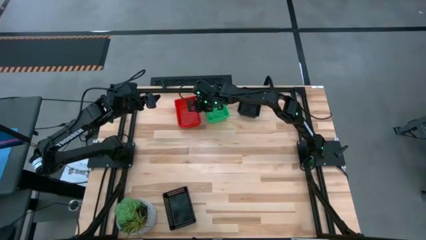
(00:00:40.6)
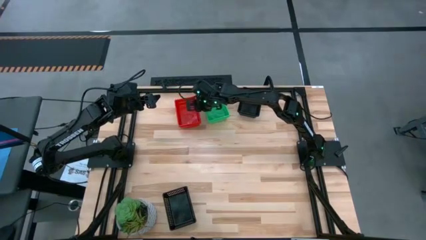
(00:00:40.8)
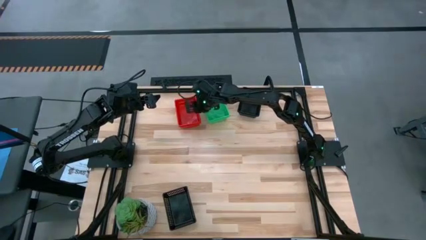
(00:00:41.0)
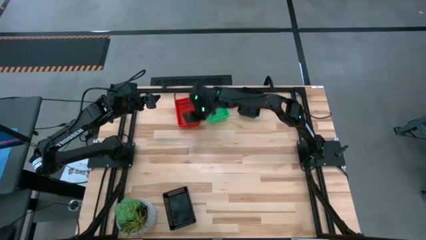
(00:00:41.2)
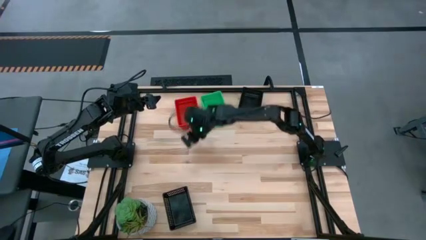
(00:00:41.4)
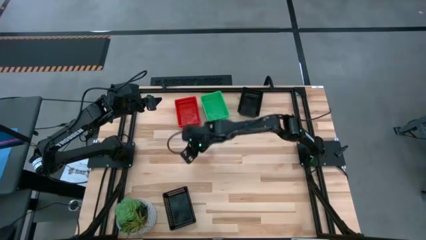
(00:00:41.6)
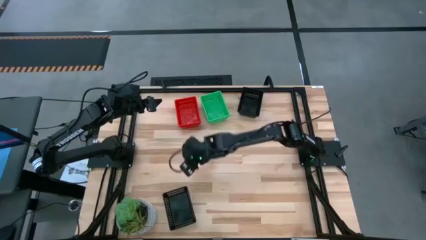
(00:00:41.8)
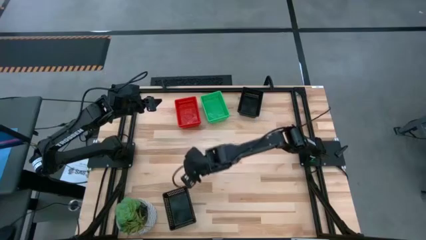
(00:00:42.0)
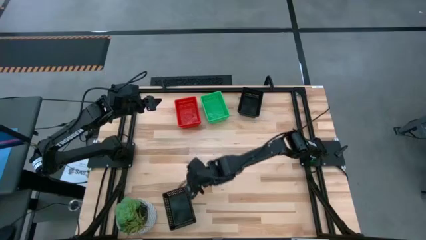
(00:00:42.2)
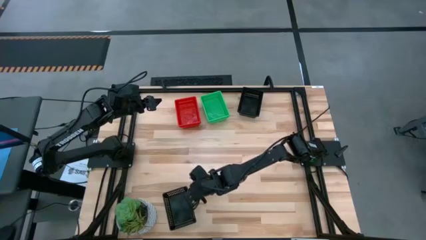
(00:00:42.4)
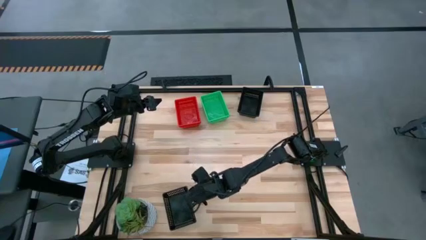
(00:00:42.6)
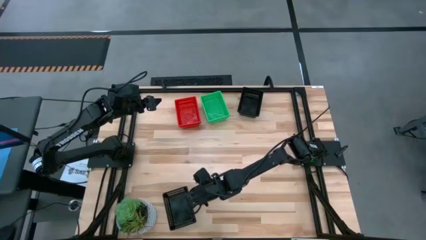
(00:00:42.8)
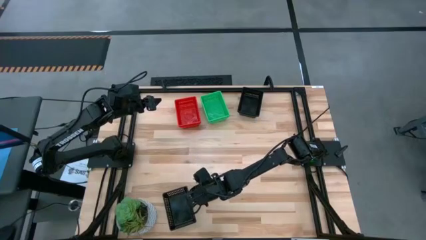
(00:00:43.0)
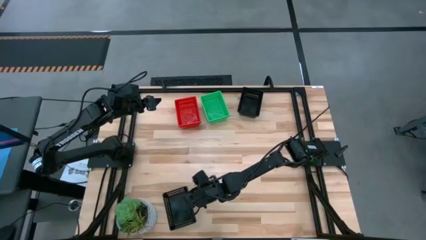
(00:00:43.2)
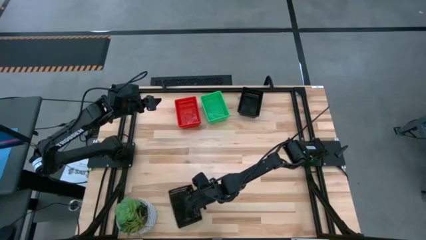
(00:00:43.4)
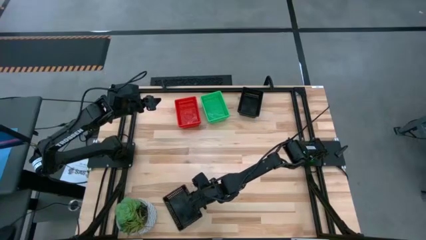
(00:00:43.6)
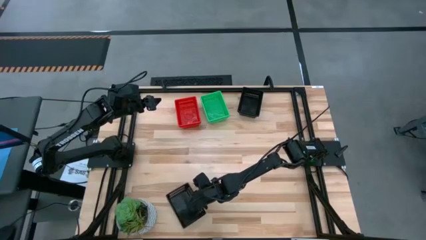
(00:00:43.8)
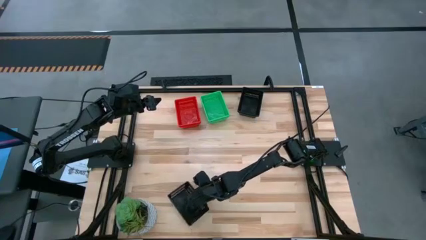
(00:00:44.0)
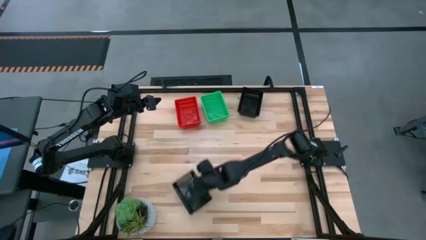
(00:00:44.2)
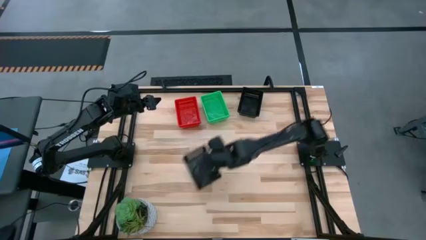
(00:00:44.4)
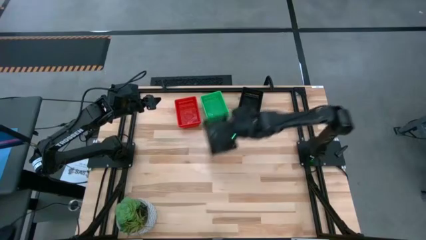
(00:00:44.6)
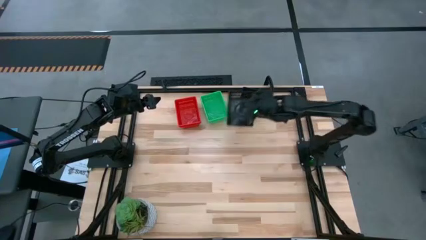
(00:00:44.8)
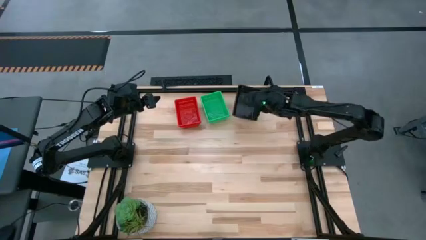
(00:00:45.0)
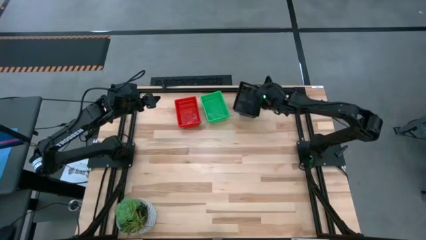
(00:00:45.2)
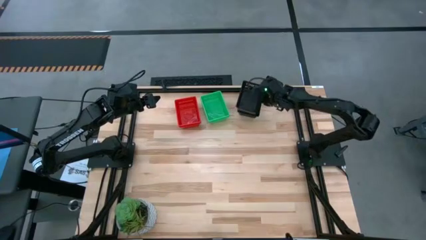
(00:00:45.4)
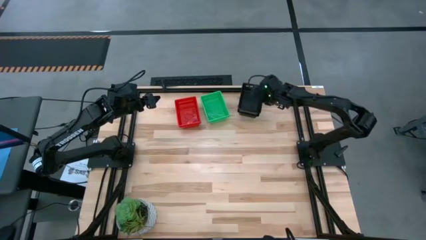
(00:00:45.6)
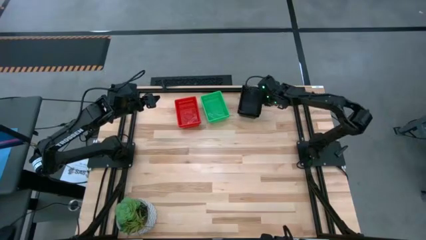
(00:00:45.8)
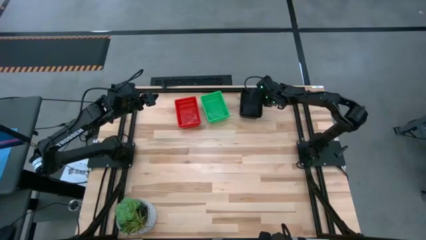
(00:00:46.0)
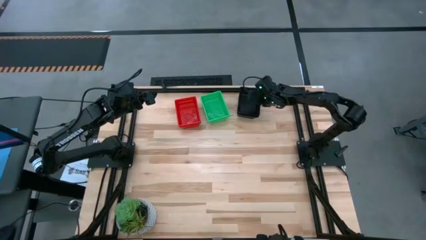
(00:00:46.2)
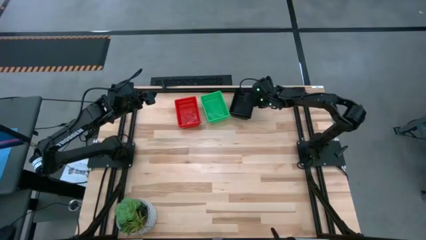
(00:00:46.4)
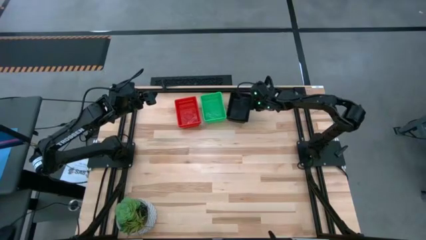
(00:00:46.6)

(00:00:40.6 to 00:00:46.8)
Stack the bottom black bin on top of the top black bins

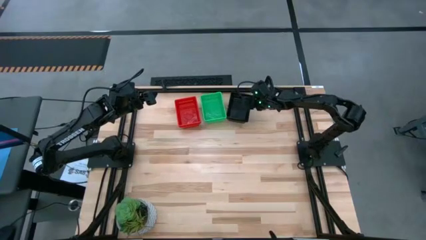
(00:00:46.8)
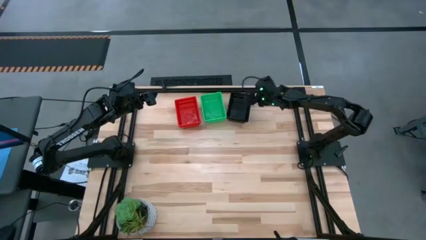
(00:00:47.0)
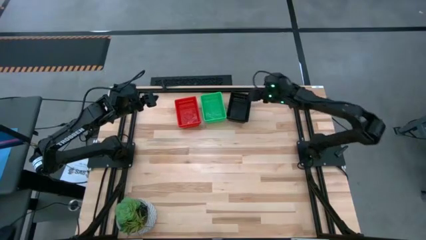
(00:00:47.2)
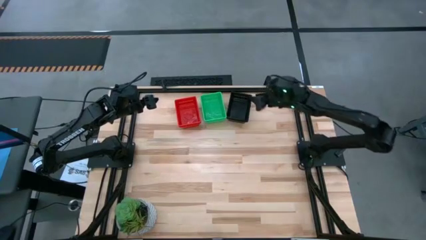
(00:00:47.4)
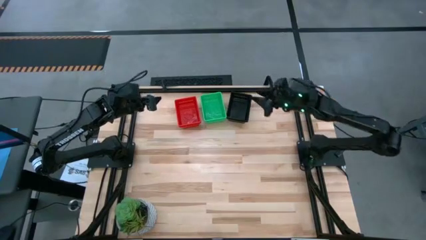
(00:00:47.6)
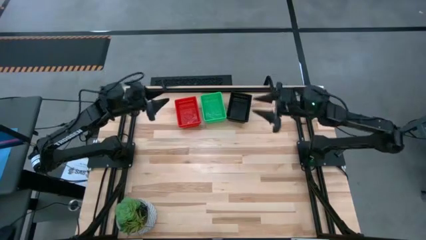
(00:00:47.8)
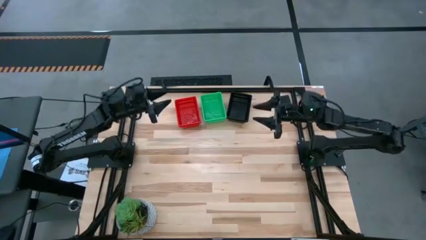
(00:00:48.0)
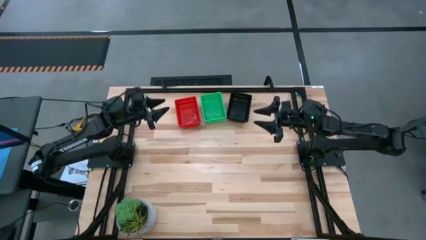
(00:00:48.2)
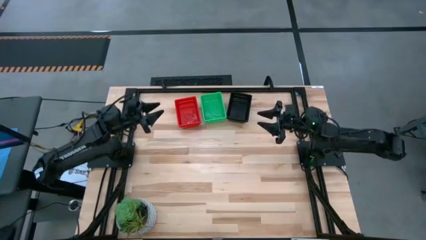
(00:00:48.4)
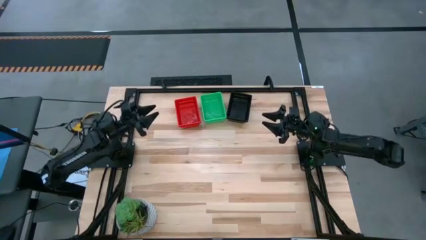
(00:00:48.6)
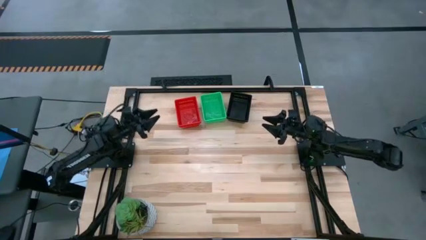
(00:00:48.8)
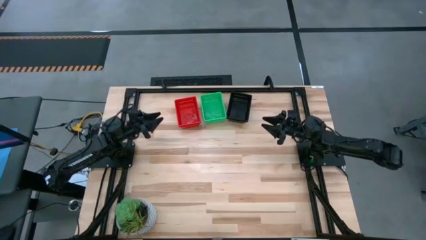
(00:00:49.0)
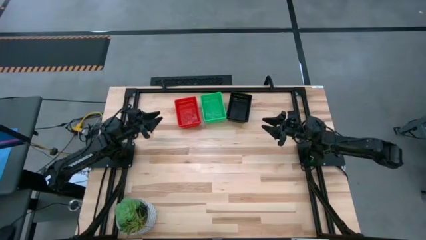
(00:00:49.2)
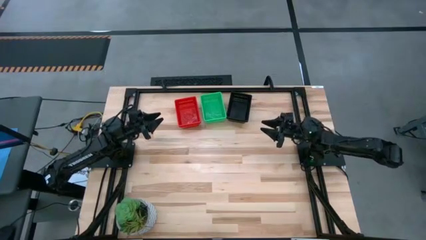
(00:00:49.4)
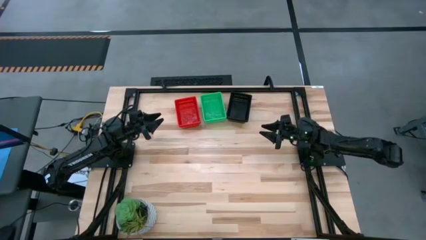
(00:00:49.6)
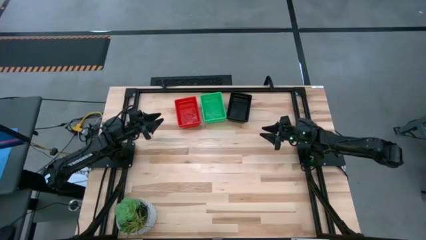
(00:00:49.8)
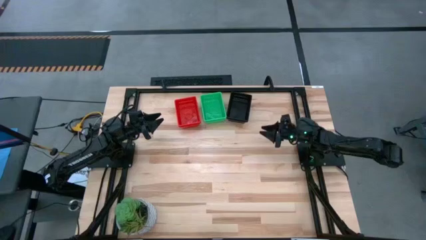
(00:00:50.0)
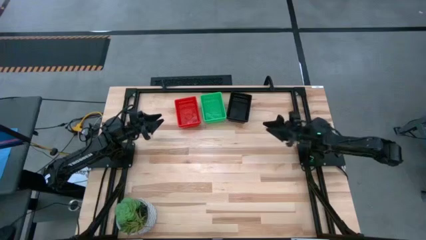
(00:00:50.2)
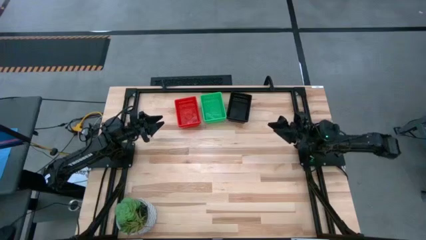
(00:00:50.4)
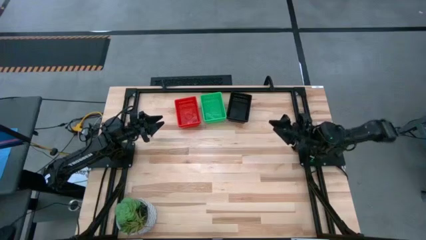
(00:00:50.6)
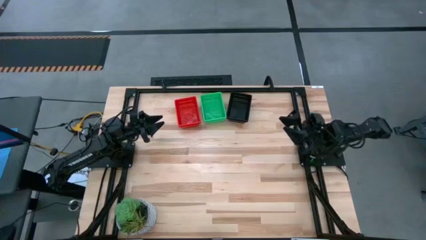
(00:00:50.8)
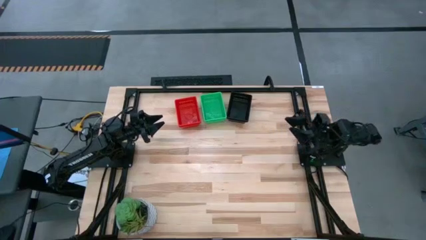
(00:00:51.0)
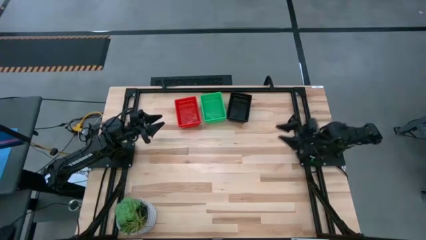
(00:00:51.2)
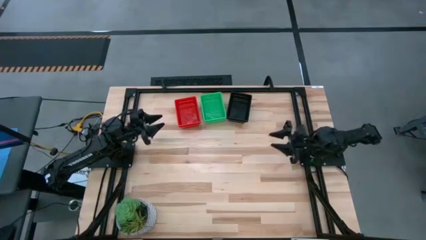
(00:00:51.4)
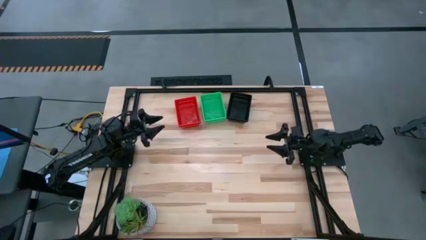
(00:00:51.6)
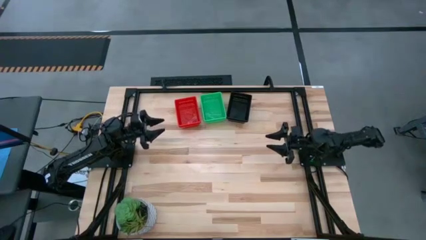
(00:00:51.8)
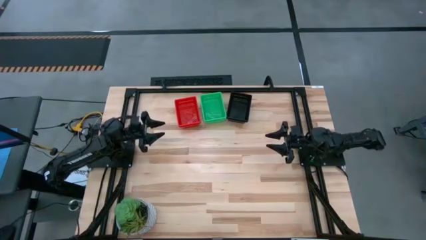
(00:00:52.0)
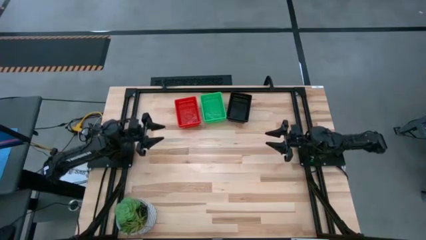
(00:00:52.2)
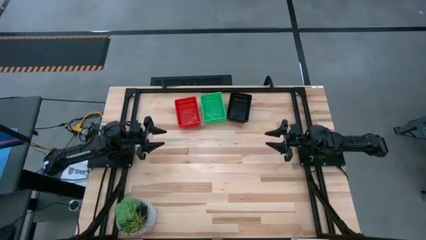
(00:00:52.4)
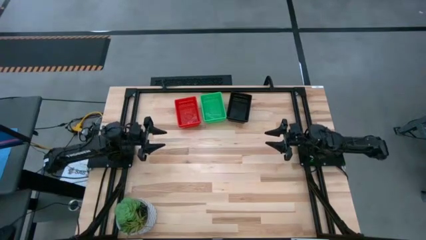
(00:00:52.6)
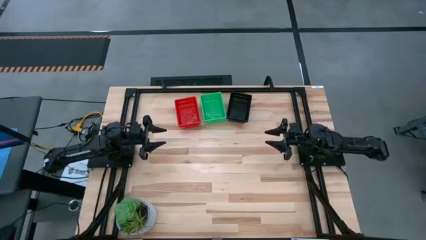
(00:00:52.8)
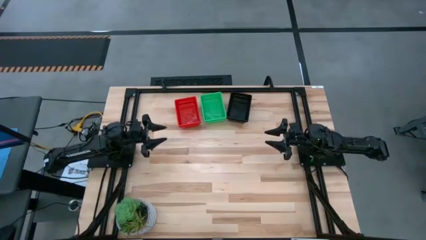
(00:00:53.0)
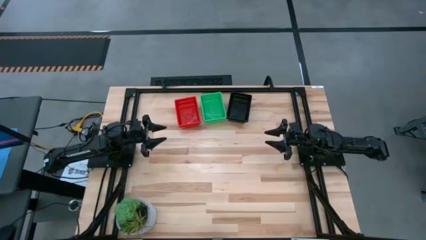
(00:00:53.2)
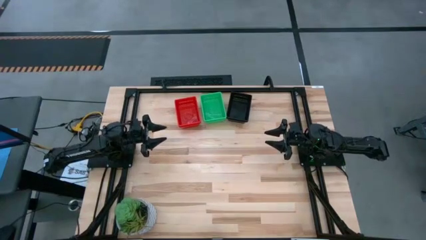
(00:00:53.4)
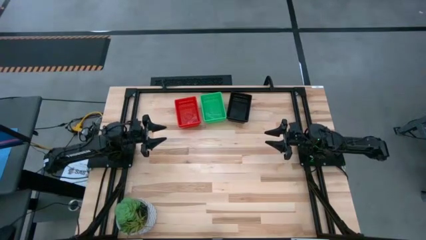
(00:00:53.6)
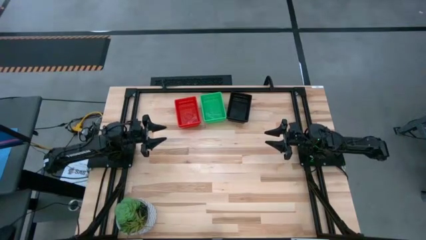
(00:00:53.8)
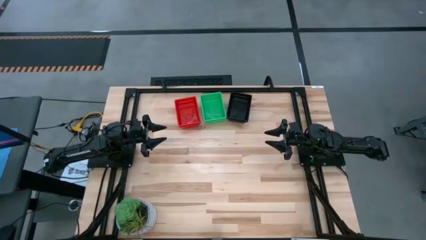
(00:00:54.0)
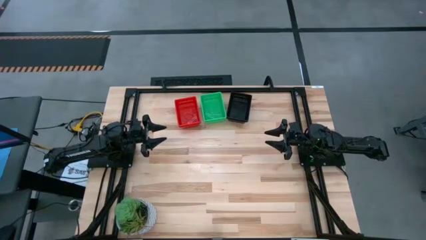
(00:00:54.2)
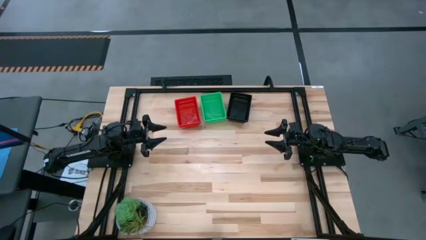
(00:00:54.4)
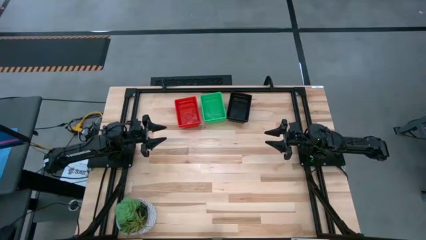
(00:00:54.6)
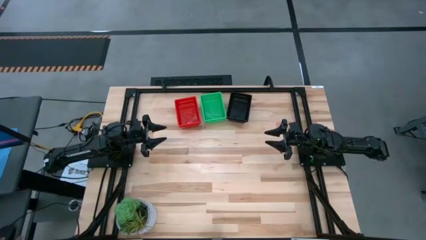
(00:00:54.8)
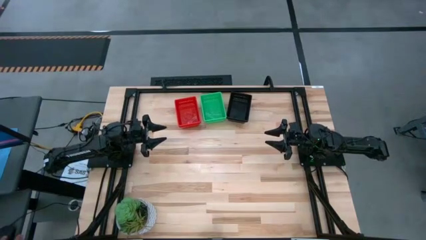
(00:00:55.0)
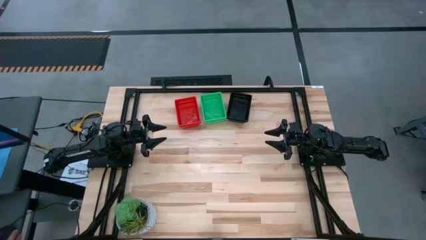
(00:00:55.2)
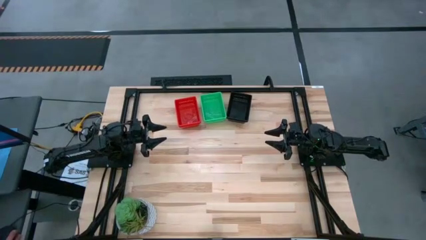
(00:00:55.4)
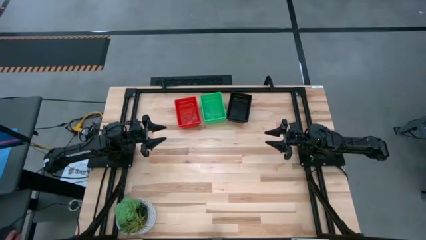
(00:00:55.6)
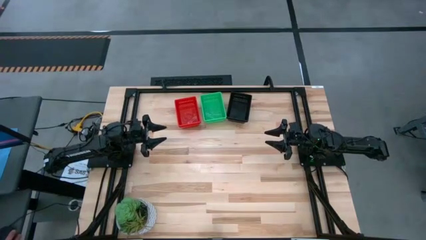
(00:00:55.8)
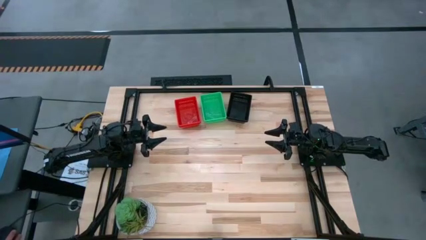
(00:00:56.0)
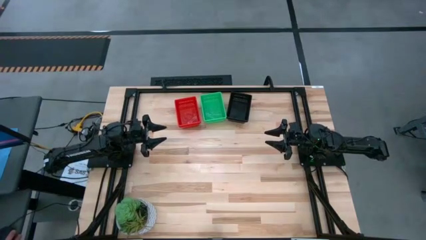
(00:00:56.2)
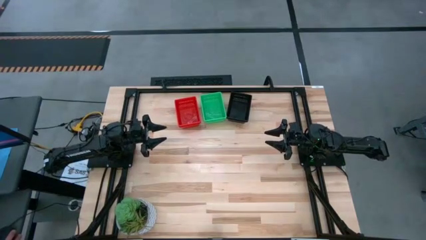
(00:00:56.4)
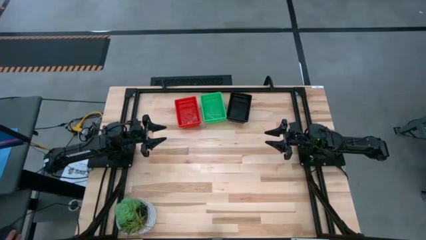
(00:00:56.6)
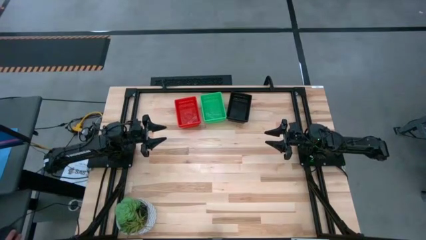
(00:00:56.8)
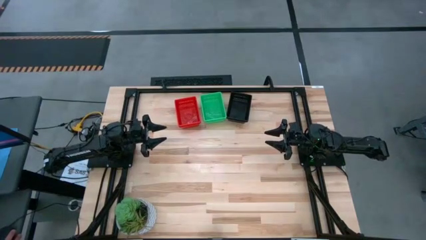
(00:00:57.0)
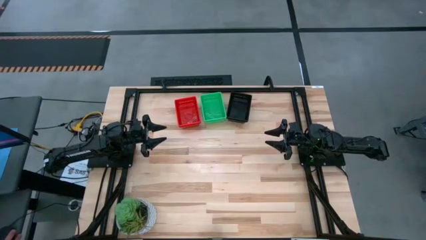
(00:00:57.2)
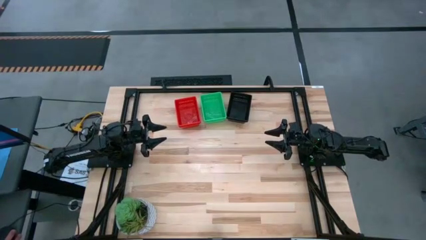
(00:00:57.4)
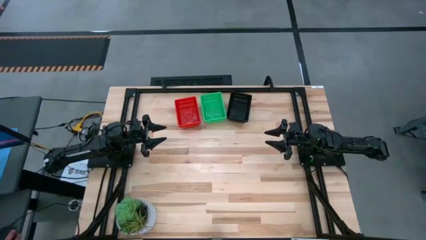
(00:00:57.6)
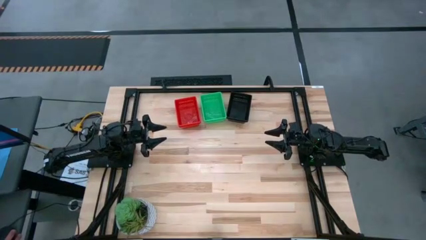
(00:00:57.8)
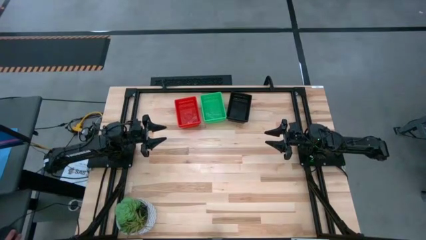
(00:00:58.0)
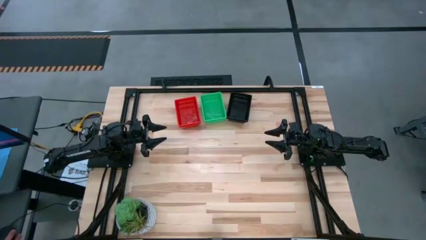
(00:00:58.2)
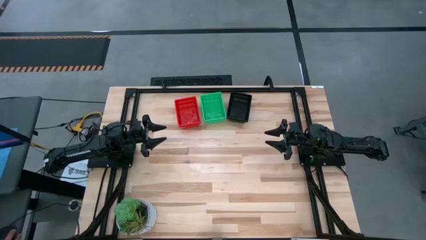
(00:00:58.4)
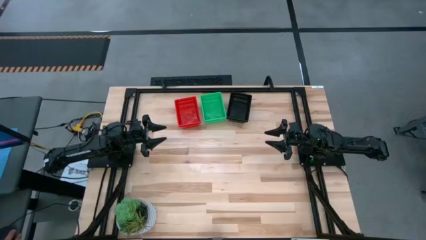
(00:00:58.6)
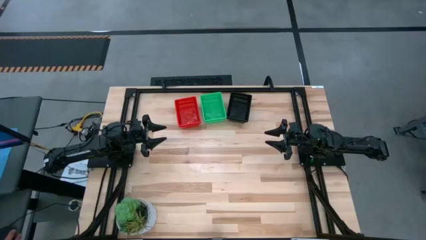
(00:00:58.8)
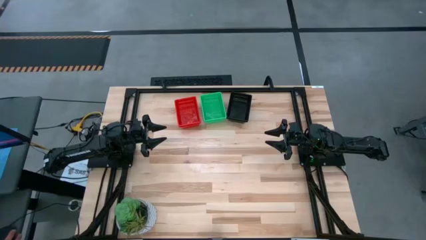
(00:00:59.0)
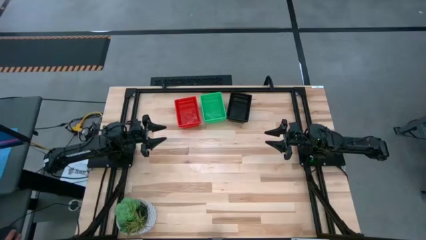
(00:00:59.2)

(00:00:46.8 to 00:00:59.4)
Return to Home Position
